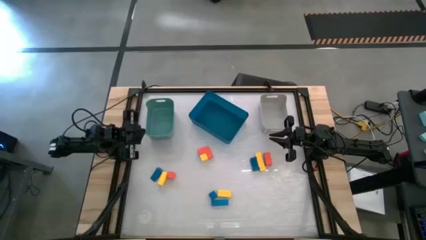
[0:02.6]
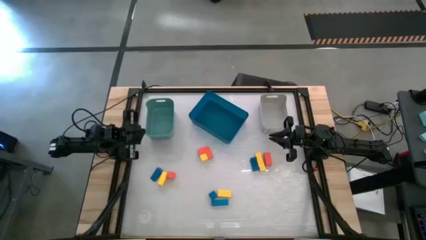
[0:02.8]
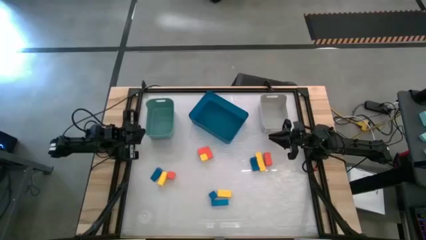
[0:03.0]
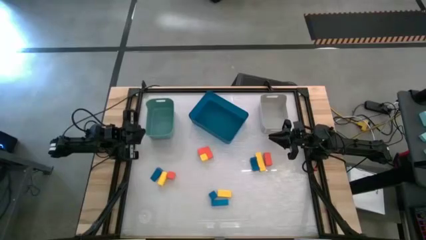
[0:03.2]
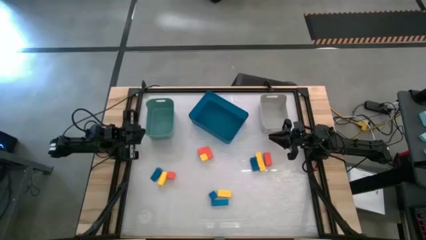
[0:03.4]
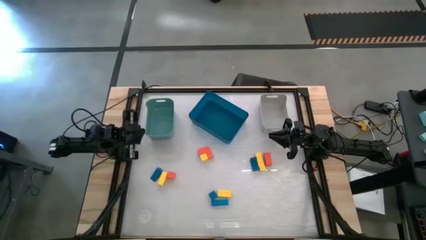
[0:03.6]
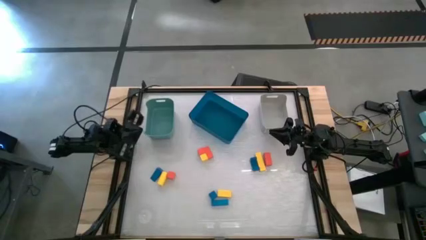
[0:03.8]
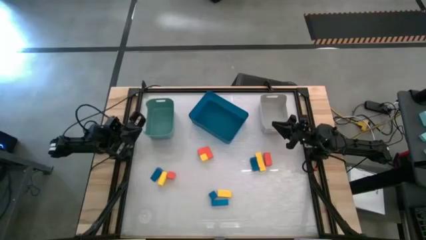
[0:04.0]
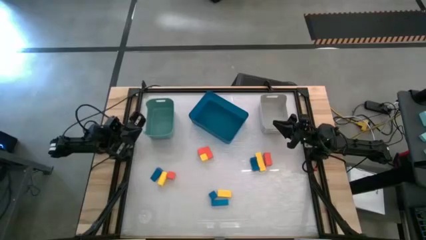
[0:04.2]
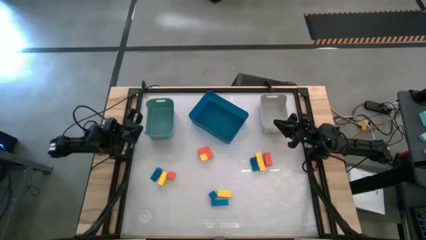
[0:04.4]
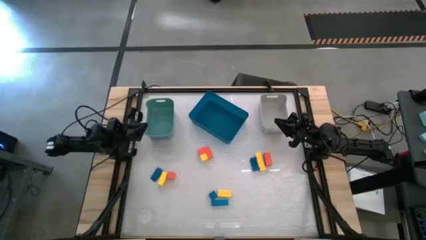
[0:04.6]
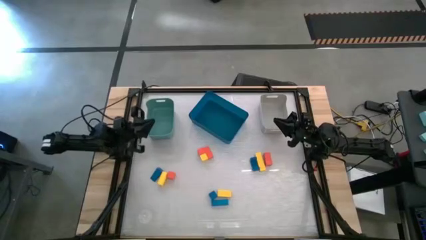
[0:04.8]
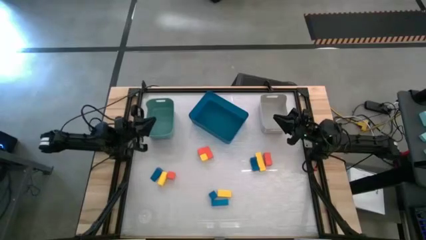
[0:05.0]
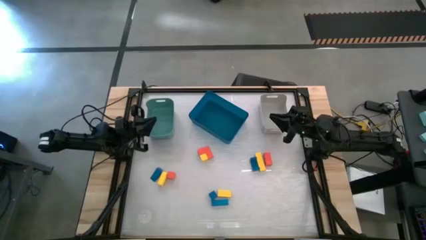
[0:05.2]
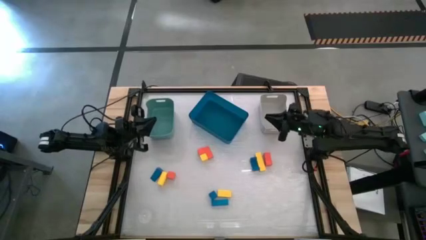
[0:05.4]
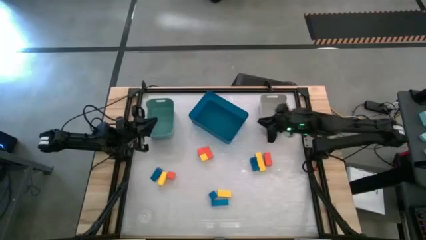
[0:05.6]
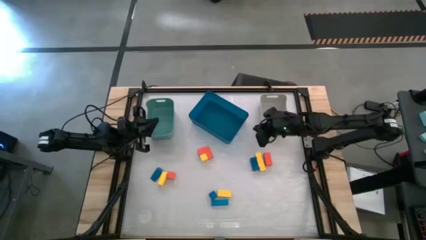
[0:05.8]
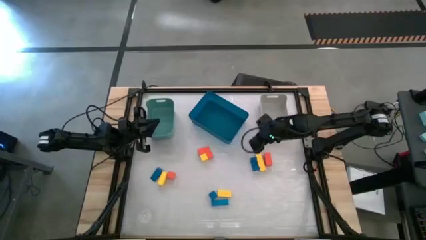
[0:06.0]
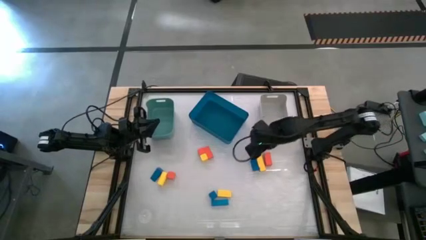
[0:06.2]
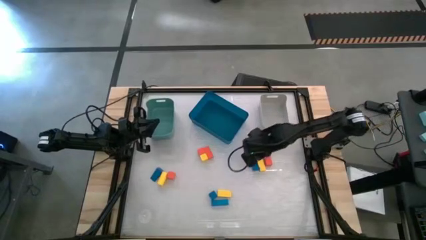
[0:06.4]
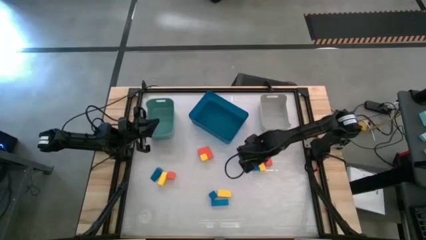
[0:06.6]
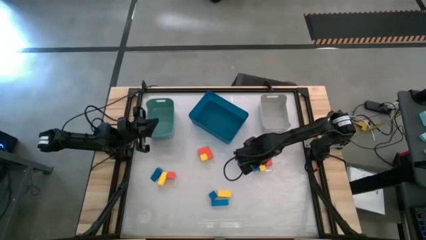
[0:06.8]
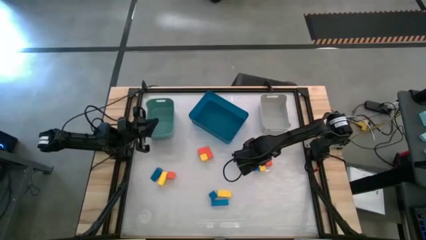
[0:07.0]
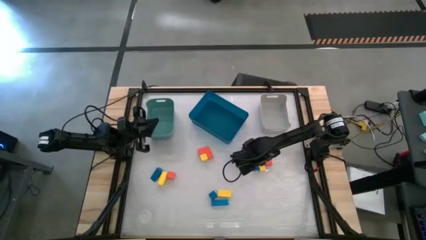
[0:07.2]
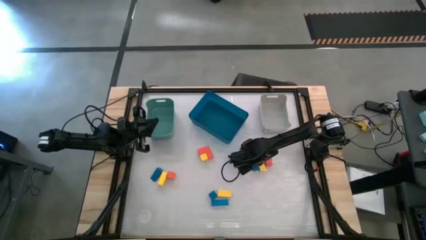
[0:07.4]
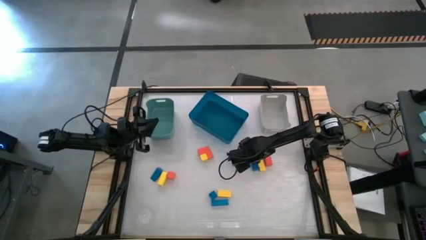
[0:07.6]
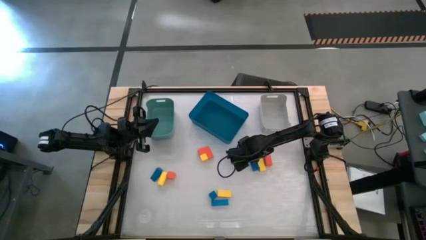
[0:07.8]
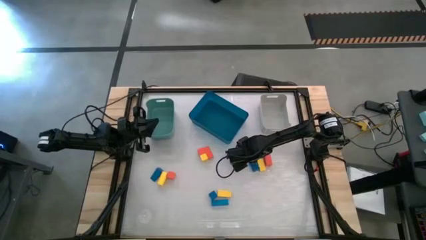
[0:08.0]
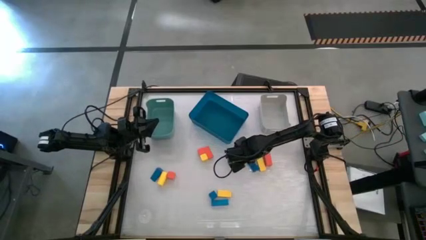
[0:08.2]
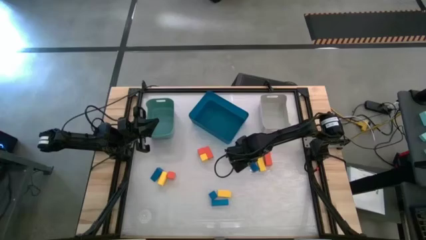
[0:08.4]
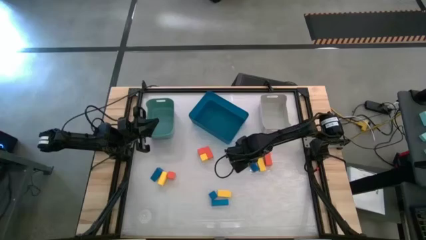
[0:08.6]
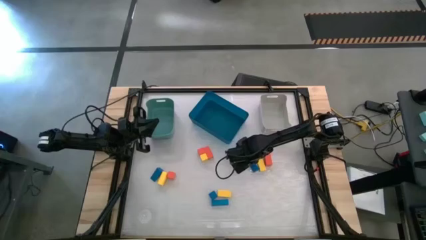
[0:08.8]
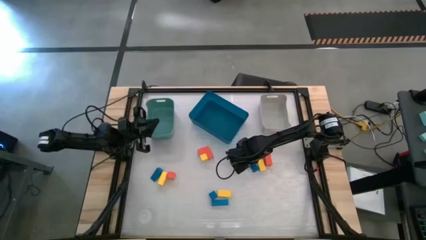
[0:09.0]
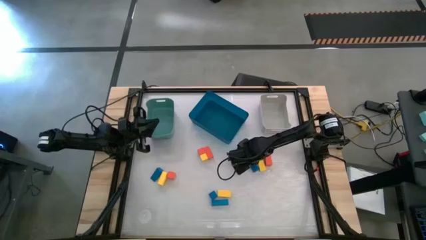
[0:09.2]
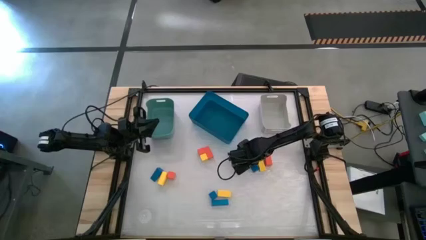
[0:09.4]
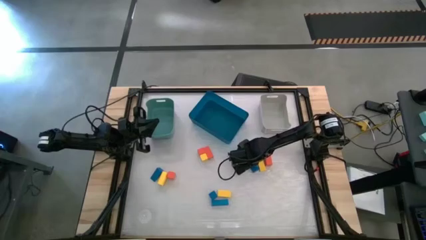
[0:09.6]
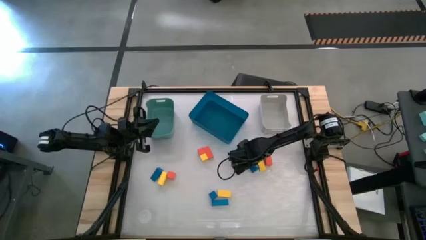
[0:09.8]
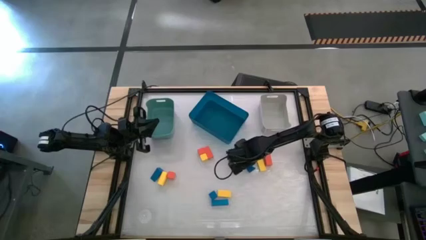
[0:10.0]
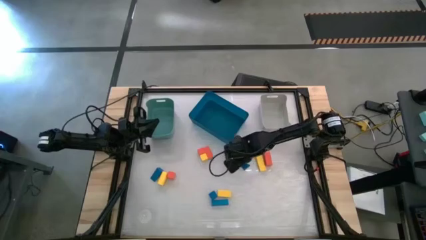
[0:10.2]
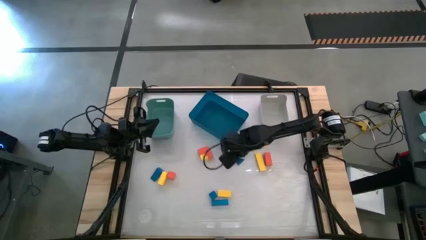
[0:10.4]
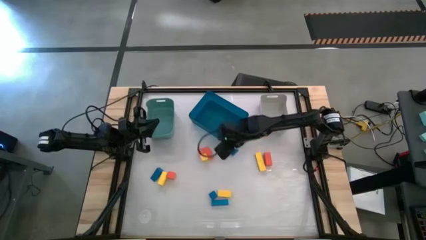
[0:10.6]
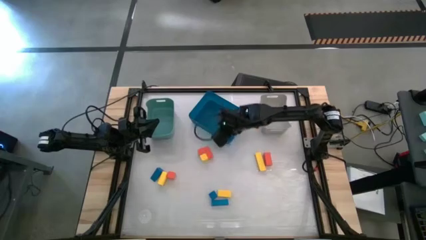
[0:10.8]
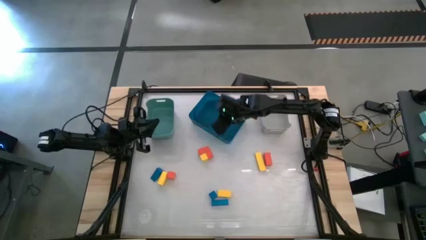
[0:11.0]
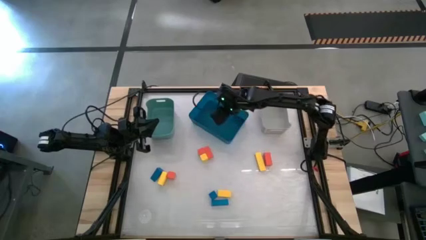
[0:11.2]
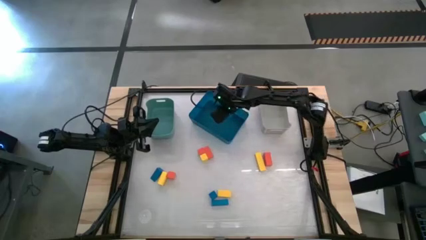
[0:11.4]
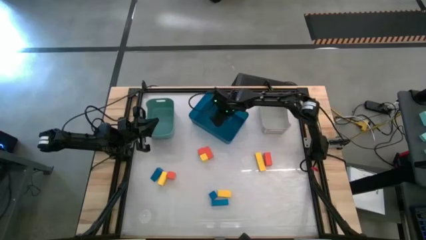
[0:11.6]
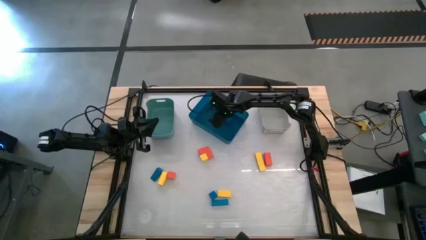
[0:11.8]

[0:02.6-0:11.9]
Task: Sort & place blocks by color
Put the blue block into the blue bin

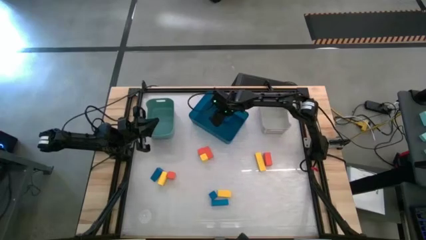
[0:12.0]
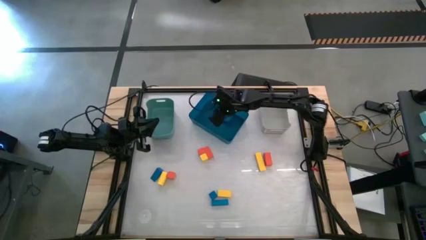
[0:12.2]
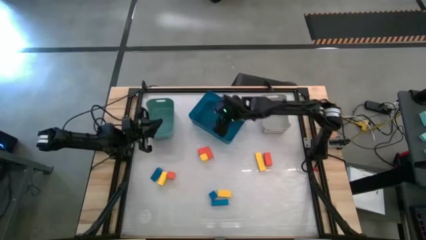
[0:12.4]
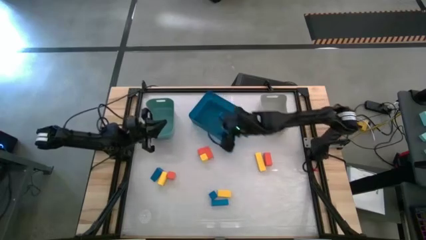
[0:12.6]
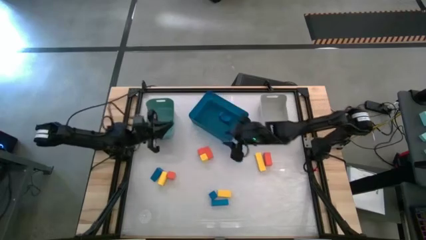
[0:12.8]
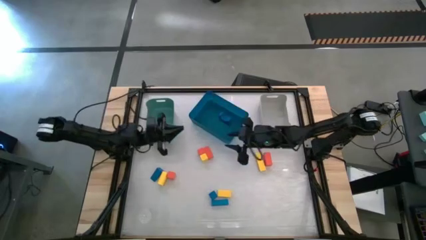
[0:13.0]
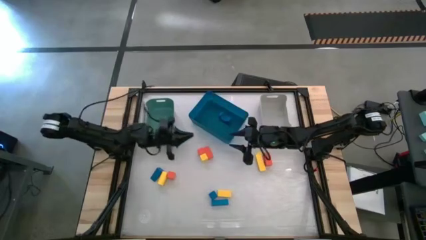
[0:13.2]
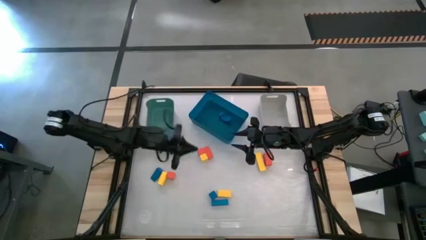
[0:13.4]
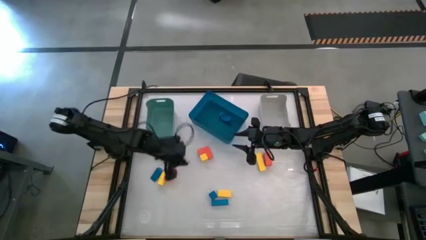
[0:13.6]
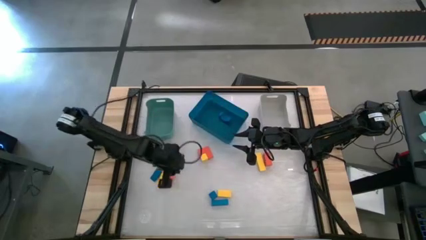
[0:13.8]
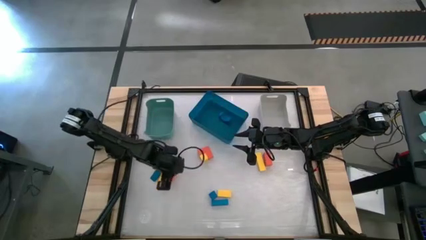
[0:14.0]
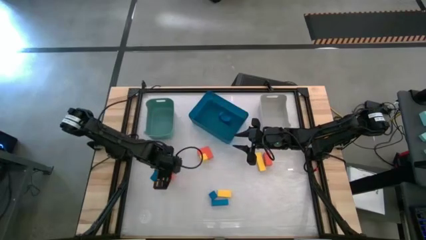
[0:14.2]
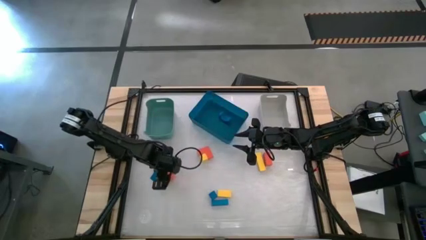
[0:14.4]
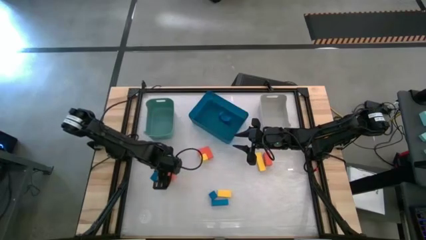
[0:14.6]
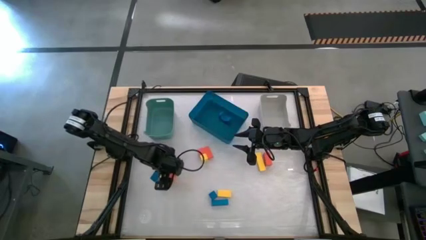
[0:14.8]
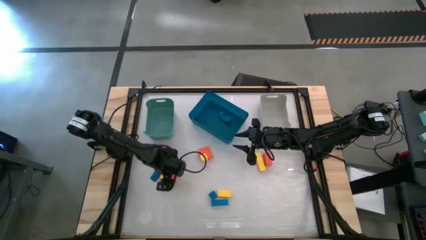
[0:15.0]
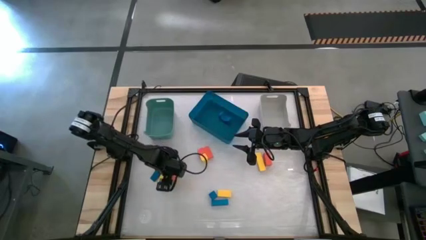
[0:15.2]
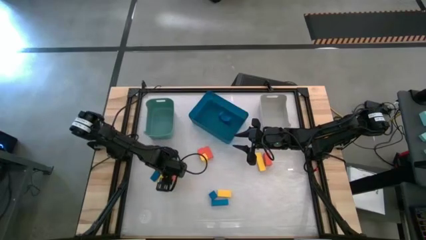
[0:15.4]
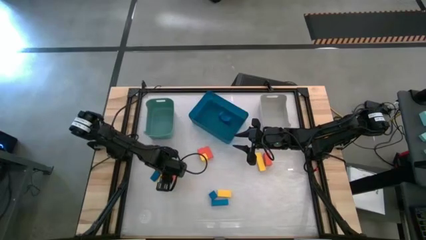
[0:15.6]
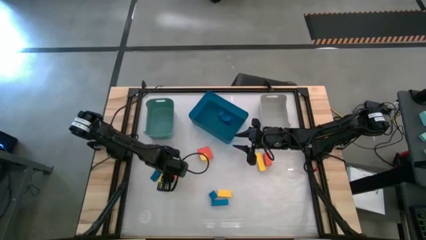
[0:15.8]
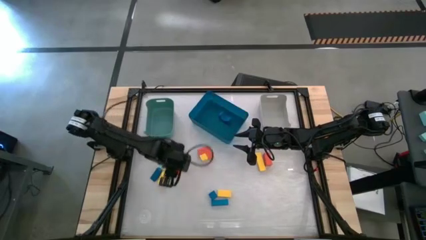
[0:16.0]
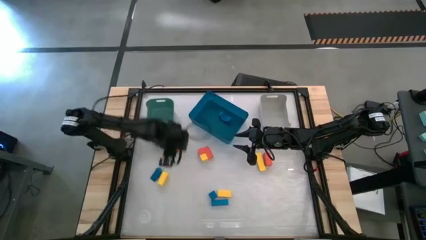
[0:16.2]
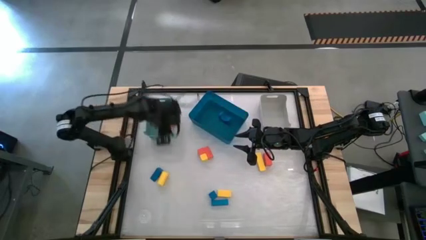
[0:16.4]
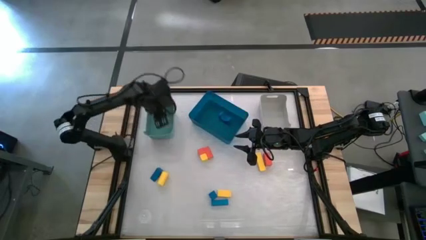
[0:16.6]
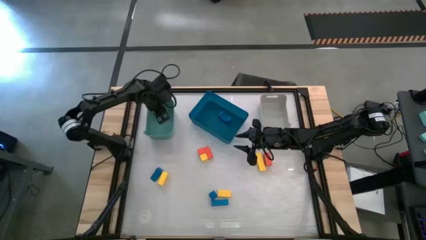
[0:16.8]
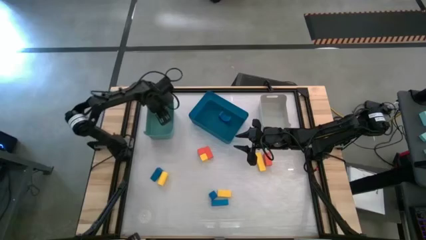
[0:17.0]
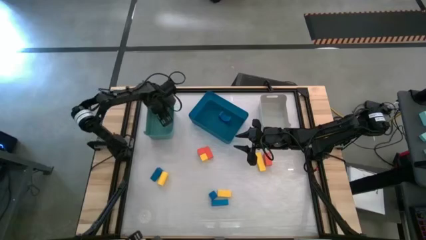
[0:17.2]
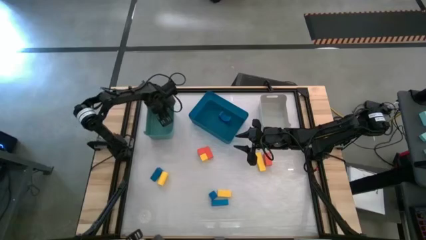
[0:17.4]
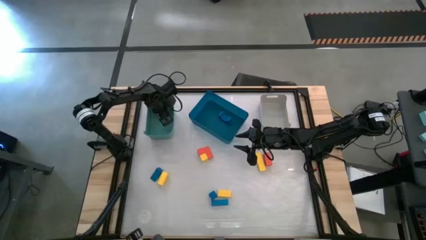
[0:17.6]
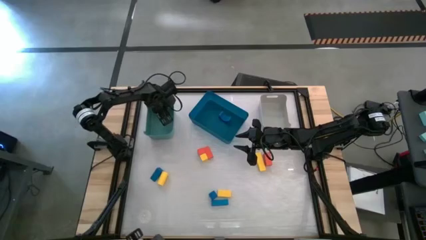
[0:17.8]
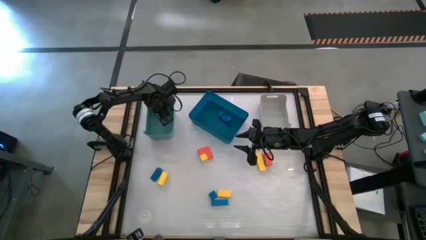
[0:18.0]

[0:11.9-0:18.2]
Put the orange block into the green bin

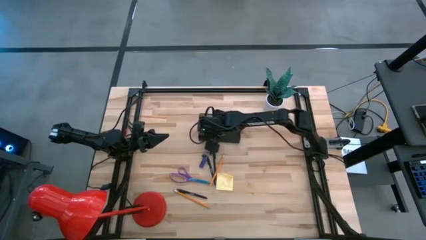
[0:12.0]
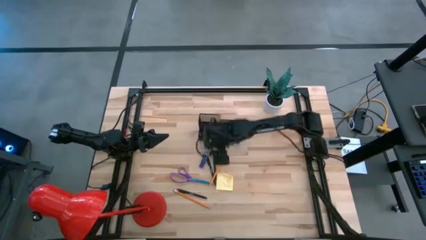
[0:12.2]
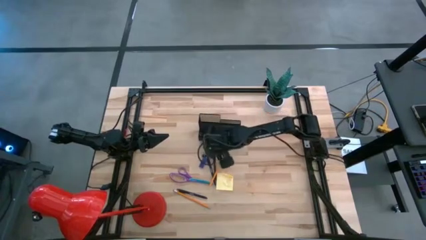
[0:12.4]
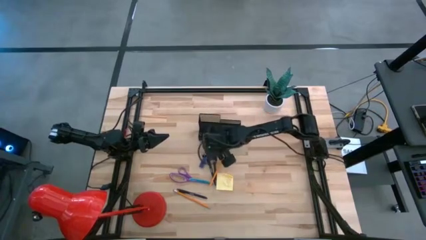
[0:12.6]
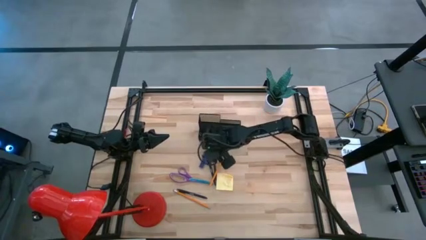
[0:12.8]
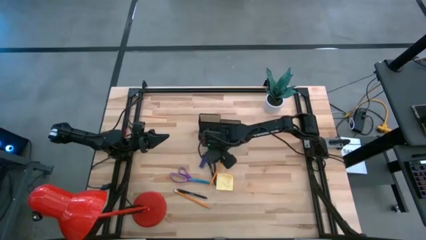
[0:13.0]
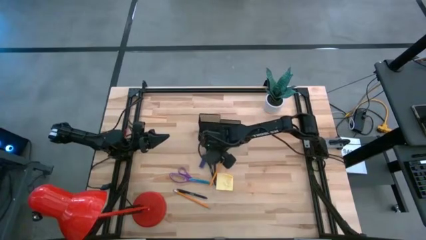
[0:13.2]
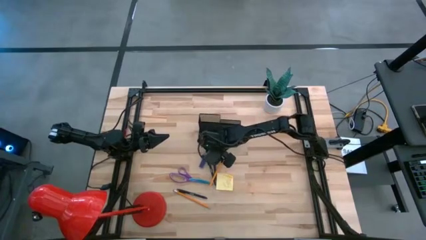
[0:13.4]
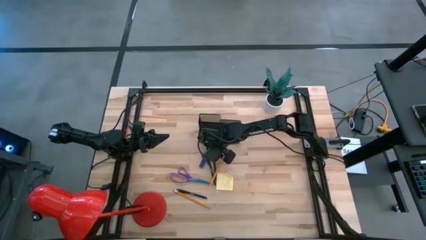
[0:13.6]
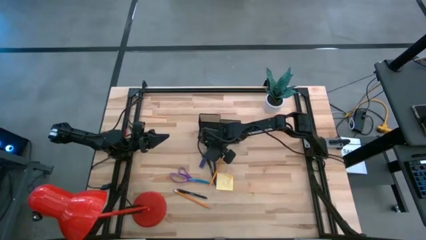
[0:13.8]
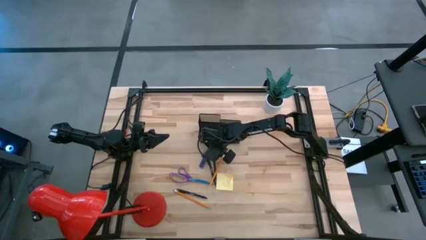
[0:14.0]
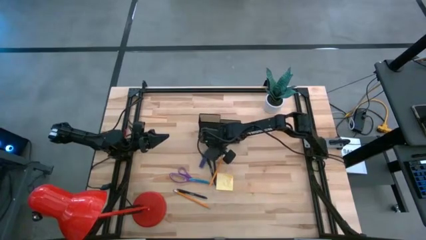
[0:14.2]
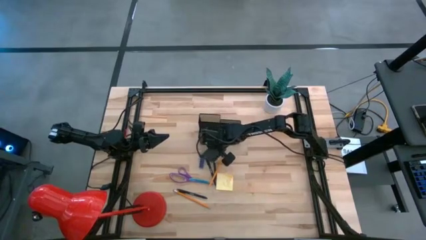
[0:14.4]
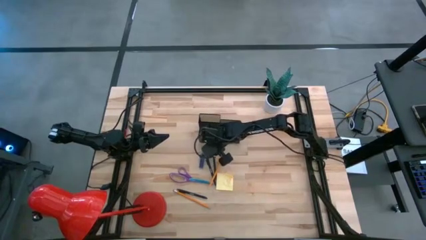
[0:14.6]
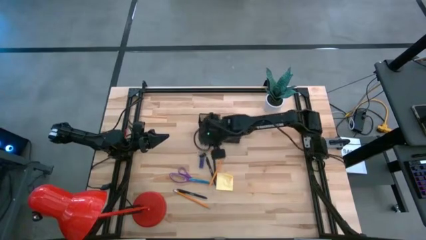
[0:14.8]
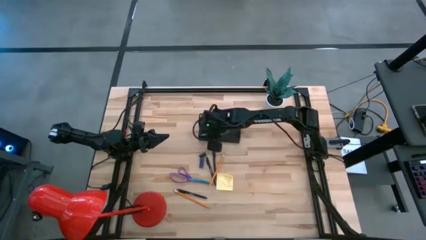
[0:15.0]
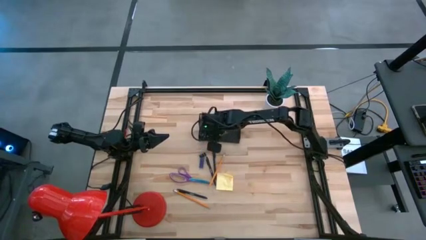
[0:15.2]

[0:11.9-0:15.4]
Task: Pick and place office supplies into organizer
Put the right black binder clip into the desk organizer
